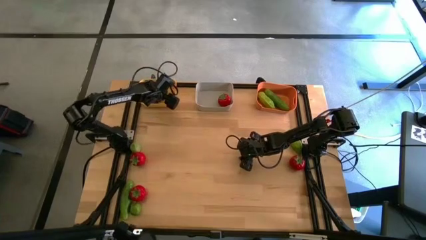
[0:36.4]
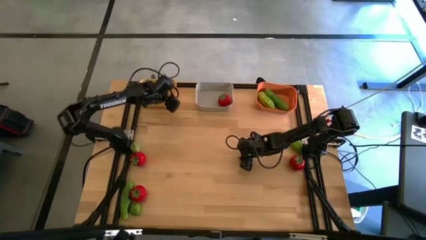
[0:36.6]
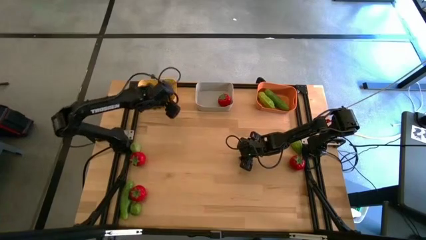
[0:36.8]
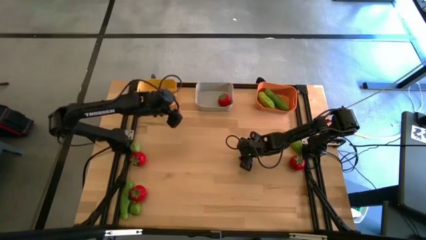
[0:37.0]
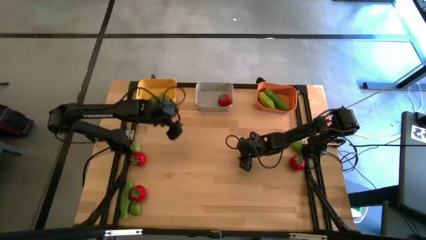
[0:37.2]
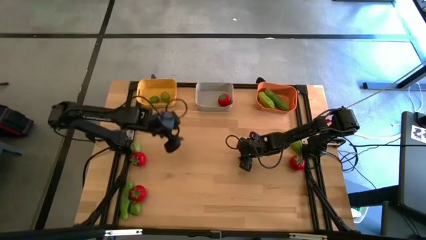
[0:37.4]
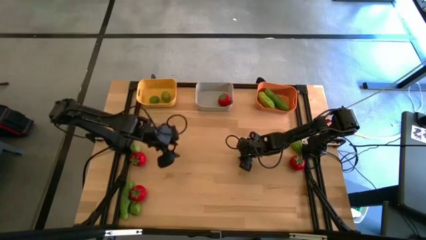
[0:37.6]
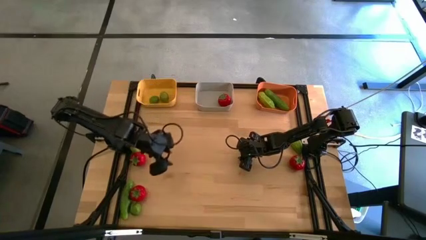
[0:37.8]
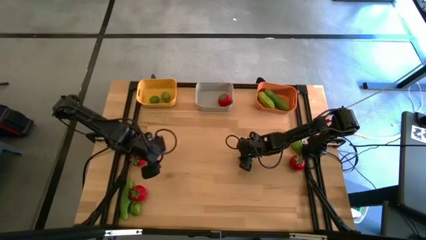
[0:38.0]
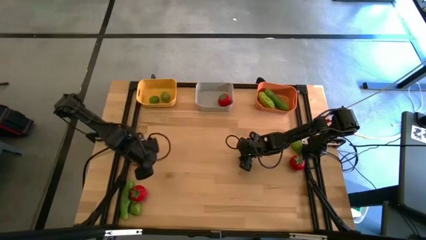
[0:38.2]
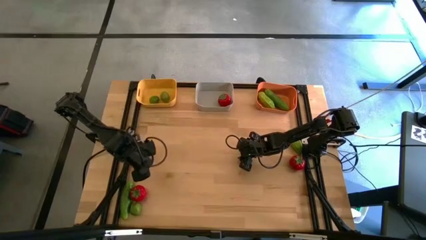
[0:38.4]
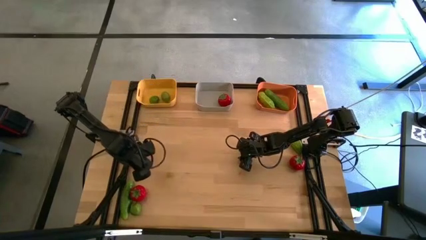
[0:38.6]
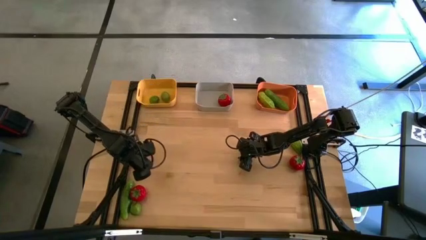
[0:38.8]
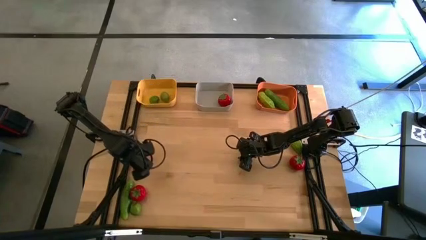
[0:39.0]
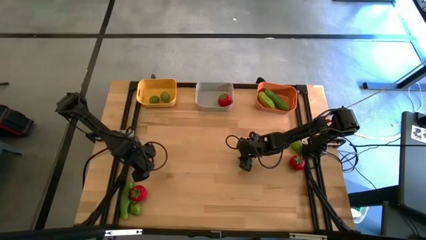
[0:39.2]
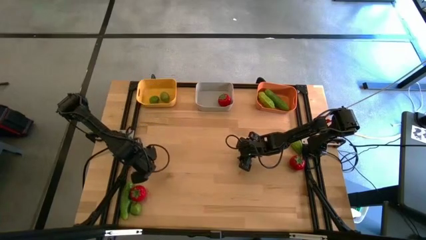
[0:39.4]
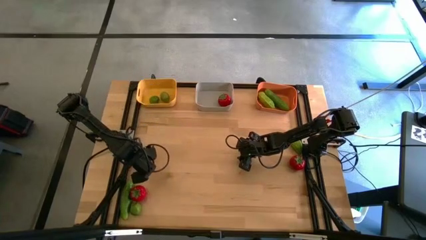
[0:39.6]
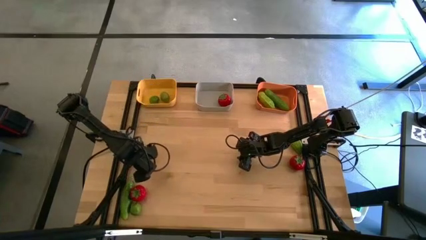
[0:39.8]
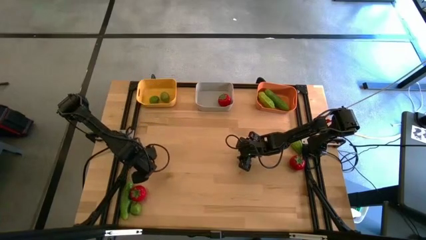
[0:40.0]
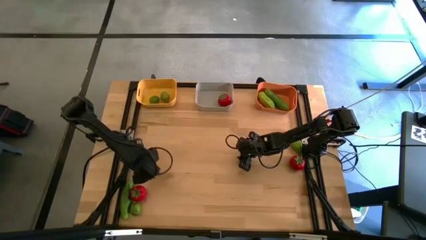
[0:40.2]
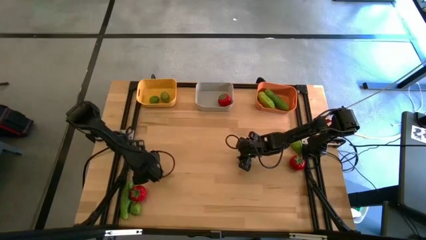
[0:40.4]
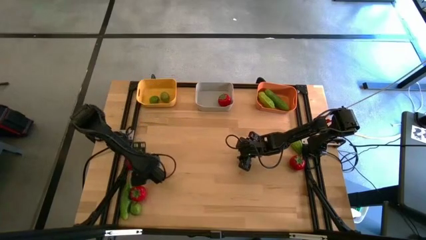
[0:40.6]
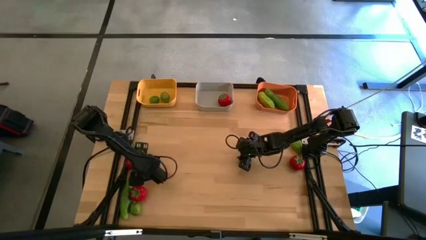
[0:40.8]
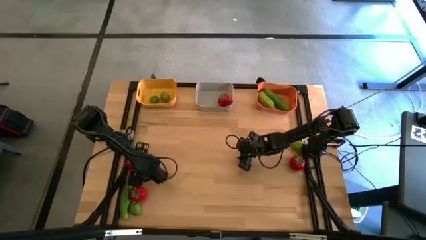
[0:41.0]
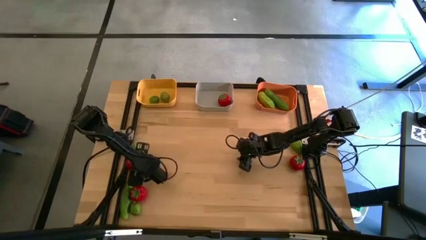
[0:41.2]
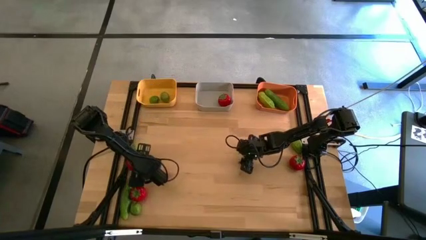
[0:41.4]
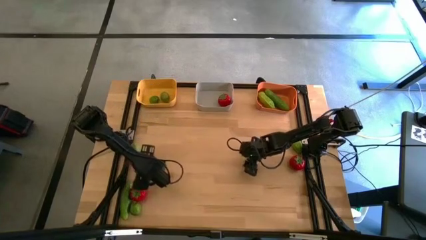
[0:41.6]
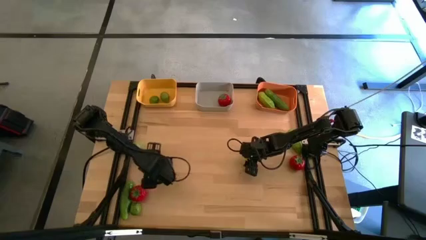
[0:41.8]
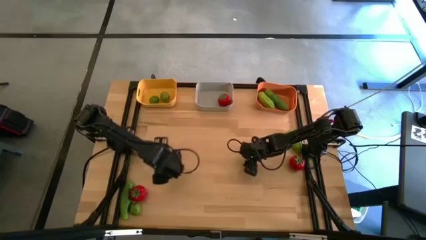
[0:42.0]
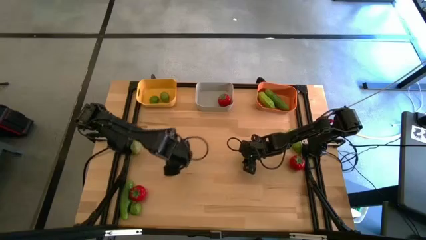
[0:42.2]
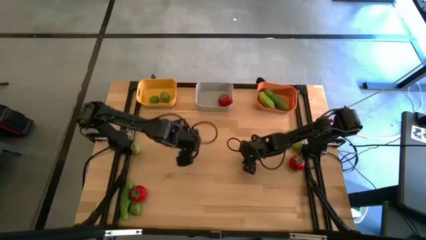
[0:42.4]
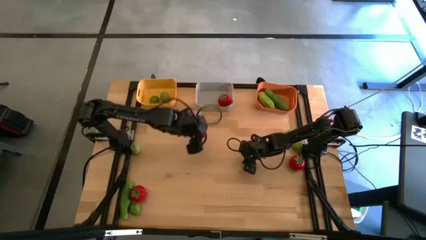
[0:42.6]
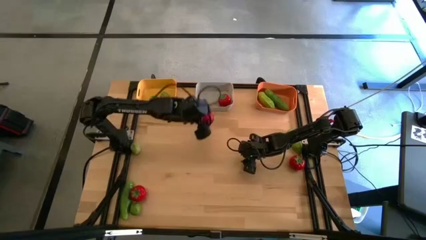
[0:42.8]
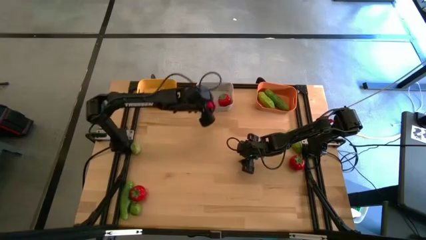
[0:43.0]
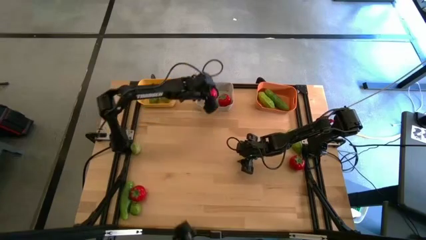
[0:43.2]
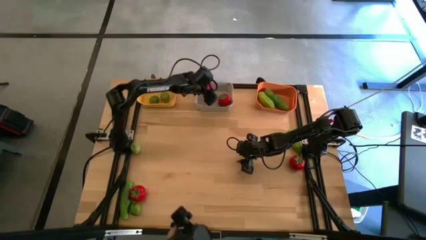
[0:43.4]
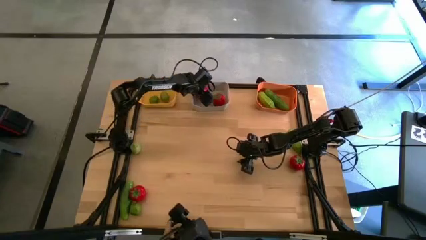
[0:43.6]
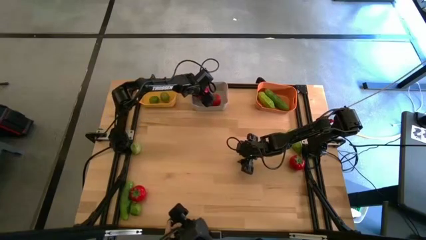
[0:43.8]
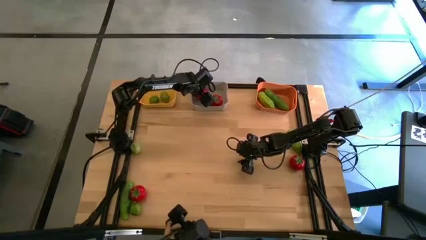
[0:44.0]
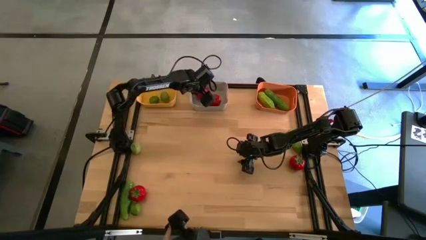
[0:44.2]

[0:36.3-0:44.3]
Task: Sort produce into baskets
Put the tomatoes into the gray bin

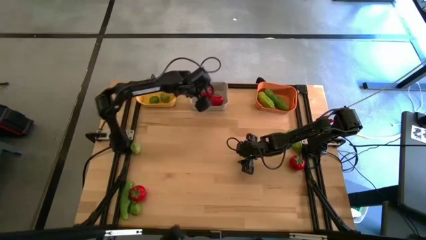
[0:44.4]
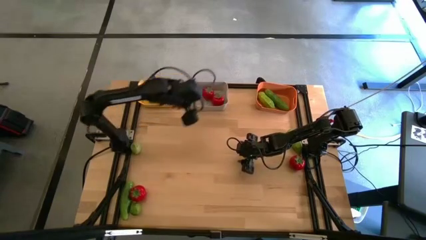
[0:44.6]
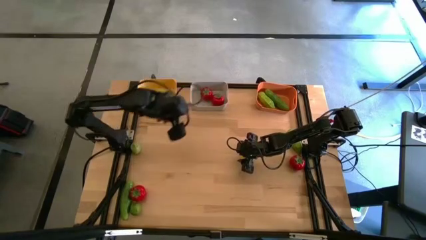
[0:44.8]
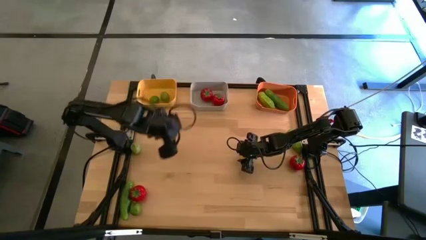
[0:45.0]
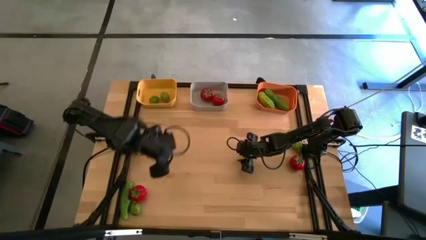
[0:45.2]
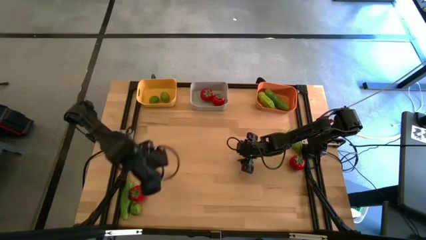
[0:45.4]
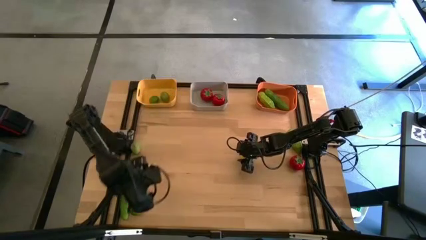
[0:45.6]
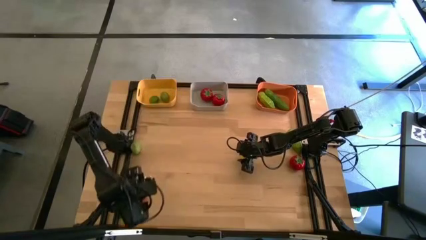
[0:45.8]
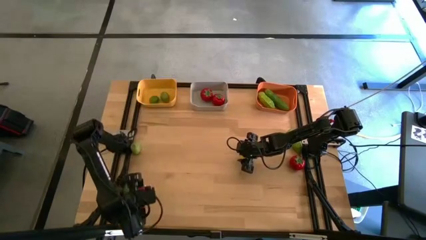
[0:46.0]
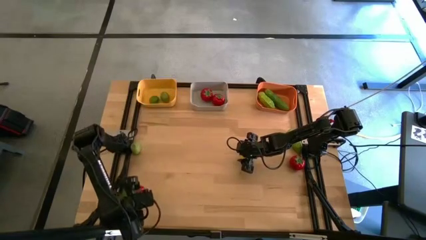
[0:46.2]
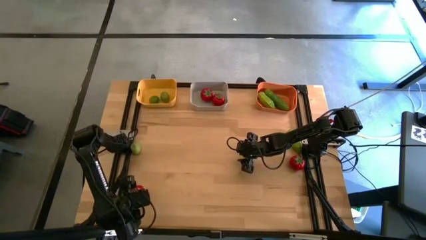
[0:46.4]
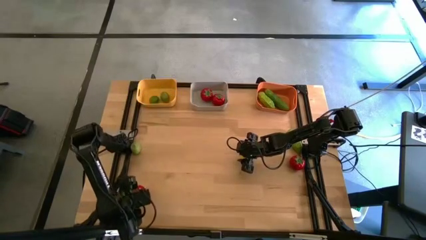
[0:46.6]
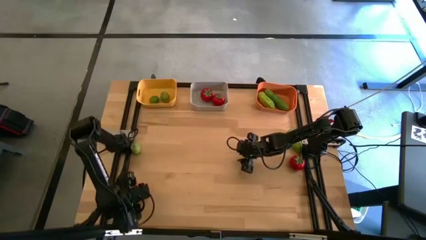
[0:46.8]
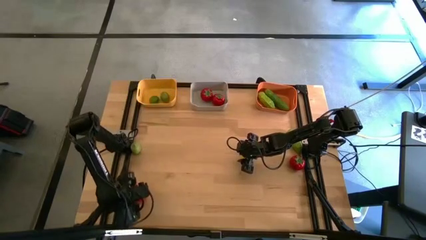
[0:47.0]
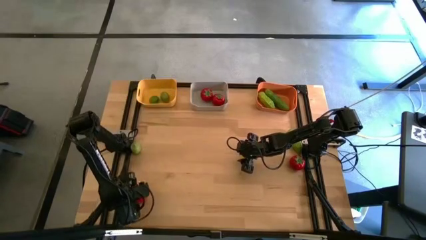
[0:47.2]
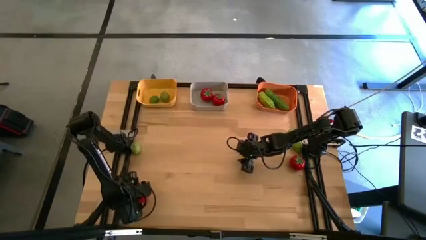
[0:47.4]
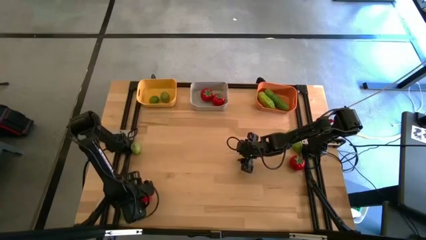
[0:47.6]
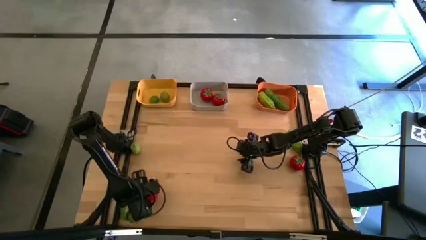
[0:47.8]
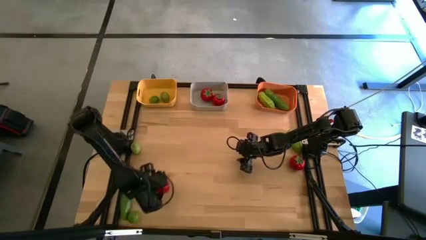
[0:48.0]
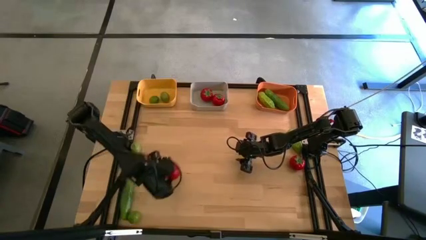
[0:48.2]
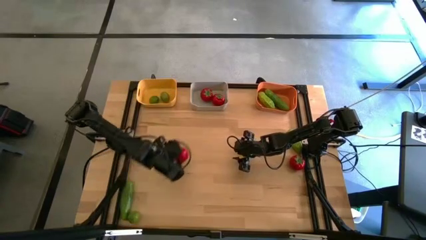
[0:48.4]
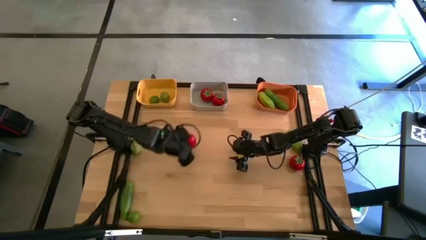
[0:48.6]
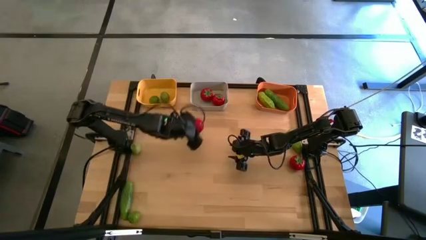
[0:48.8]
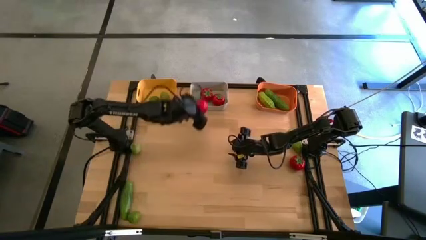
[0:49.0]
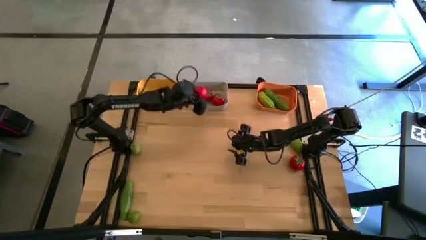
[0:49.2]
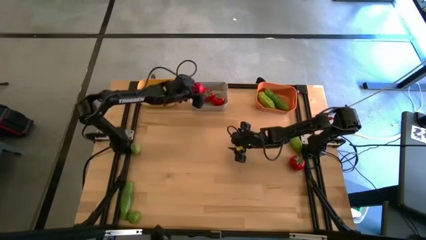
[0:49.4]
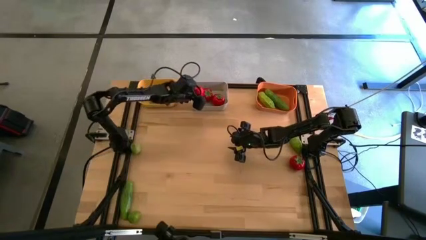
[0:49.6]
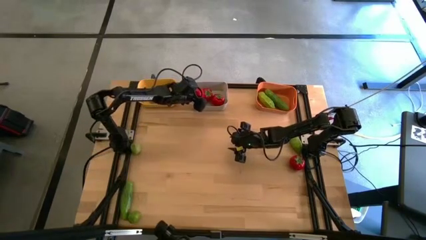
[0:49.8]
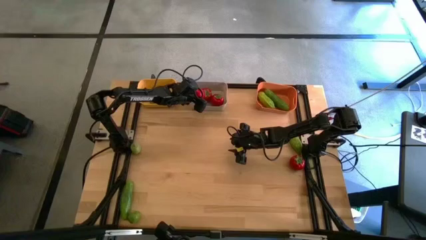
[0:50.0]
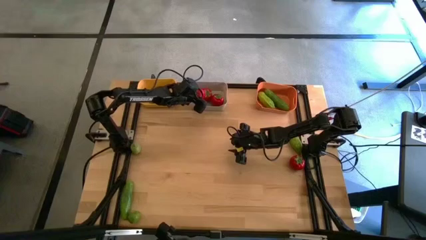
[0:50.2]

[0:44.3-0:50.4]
Put the tomatoes into the gray bin

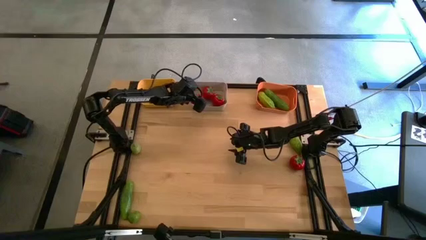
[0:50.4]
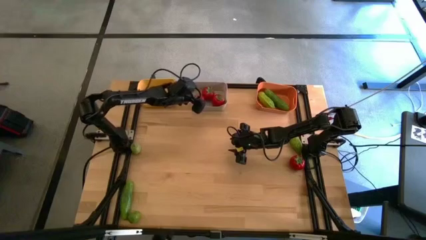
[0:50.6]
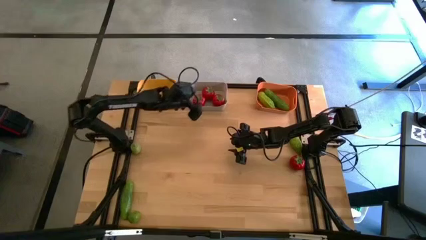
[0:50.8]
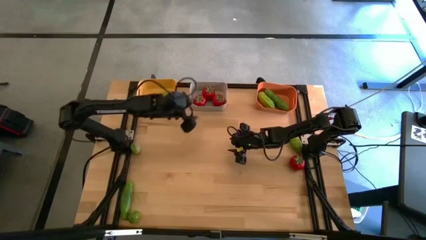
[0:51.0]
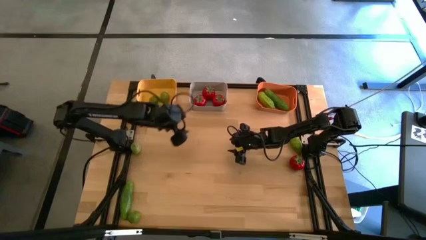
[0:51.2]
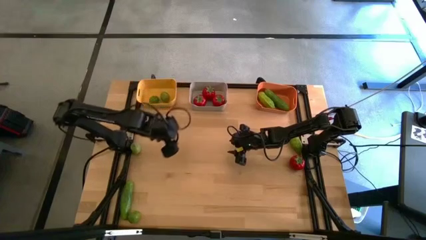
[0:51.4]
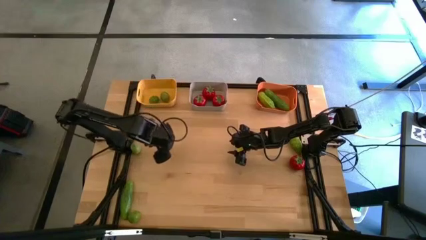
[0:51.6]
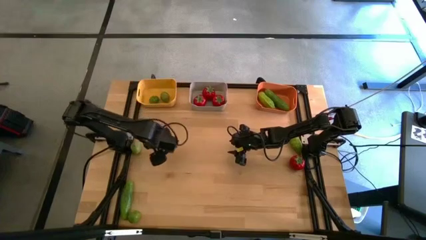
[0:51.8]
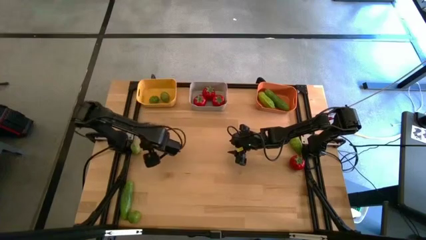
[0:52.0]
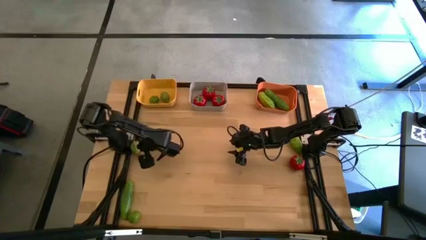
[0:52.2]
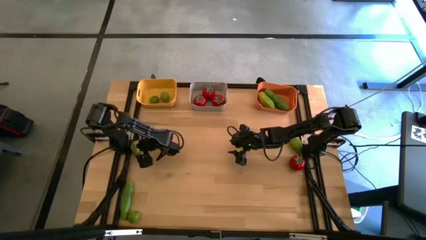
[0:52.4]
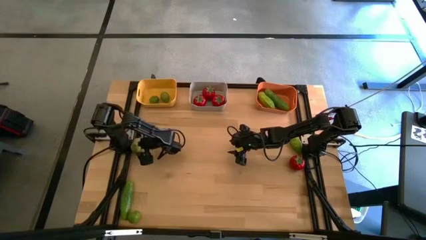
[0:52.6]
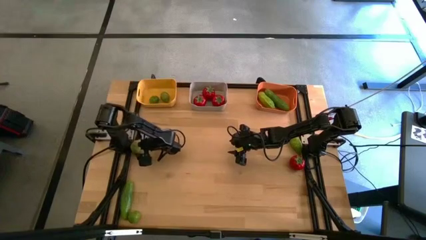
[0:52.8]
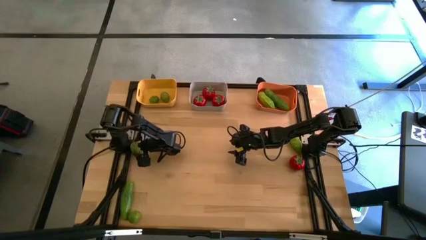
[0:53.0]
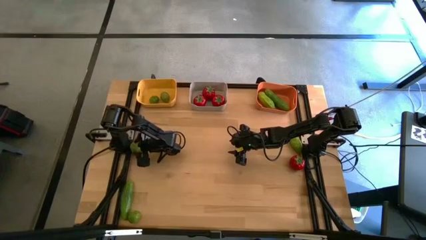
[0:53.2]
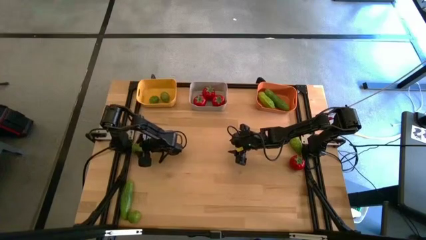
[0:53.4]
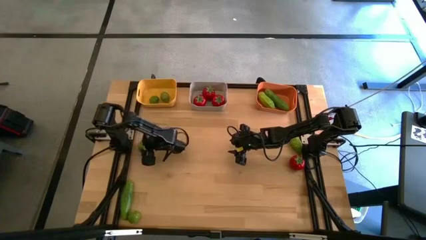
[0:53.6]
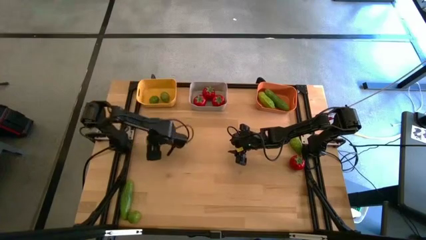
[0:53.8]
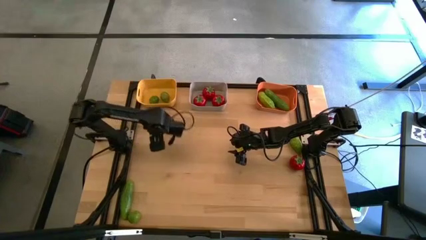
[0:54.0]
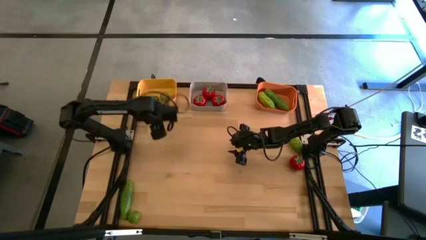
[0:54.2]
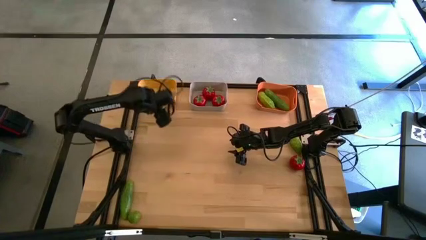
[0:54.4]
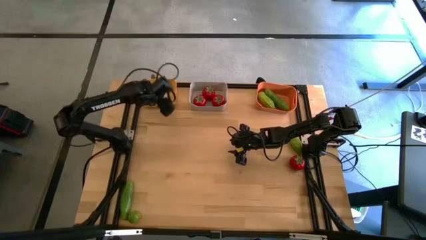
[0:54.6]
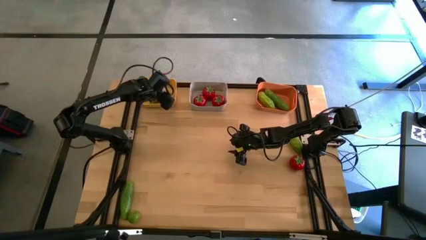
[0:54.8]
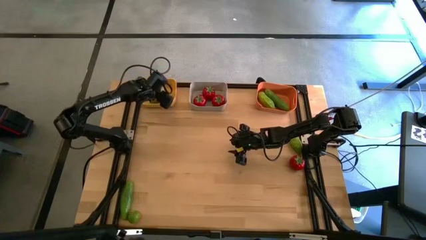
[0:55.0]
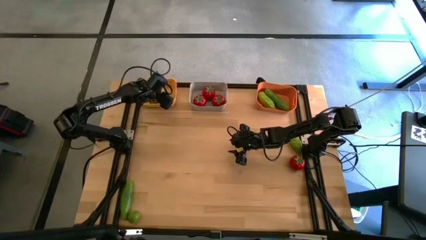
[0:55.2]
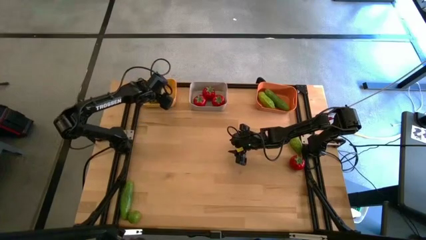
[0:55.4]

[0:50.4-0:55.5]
Put the lime into the yellow bin
